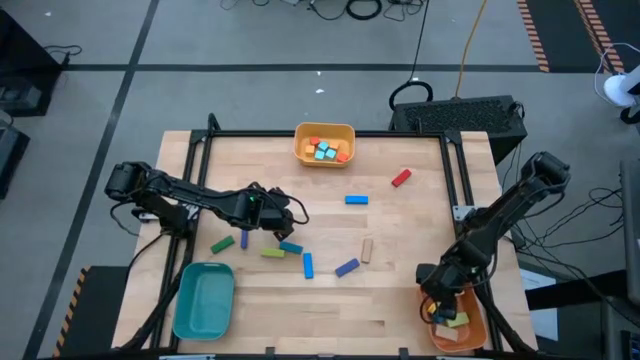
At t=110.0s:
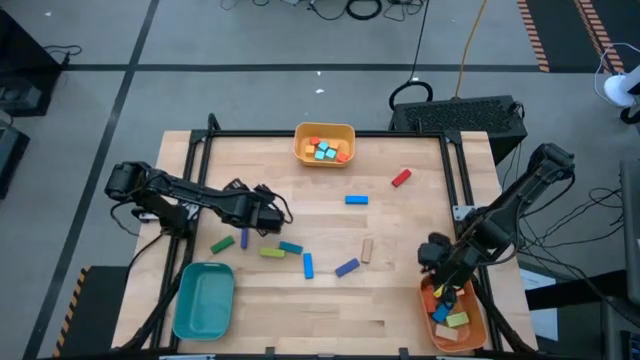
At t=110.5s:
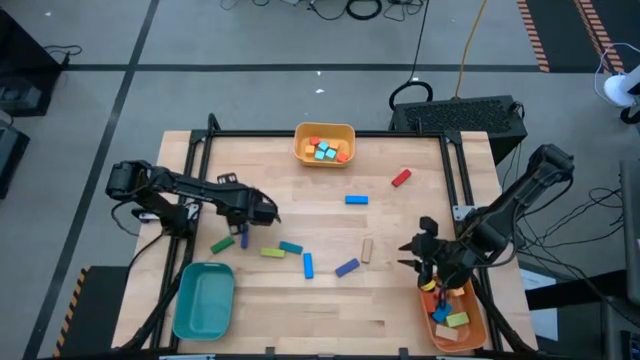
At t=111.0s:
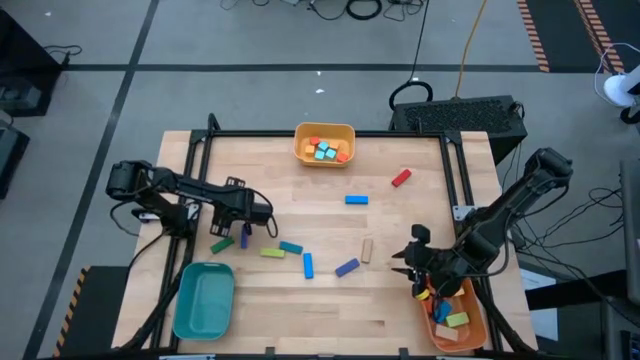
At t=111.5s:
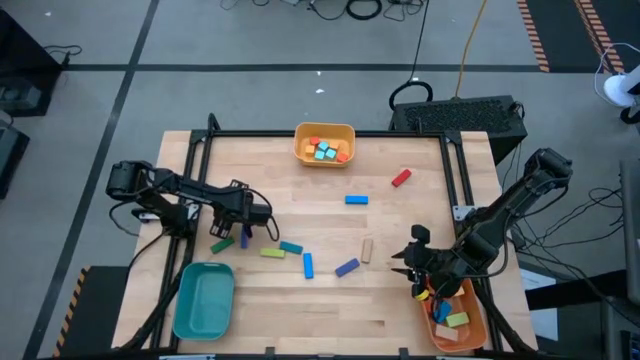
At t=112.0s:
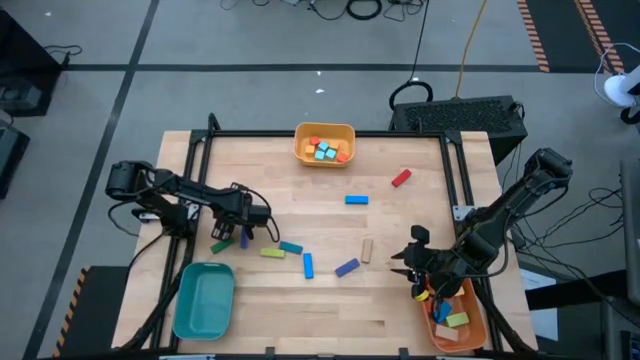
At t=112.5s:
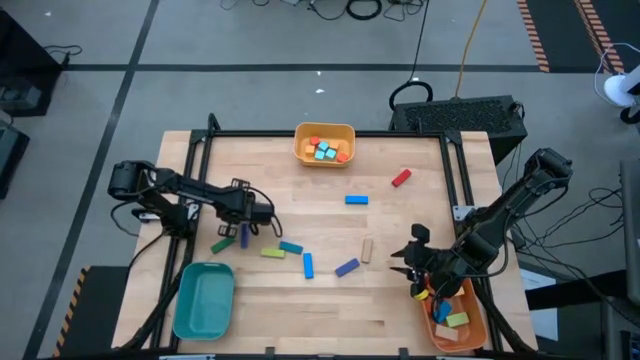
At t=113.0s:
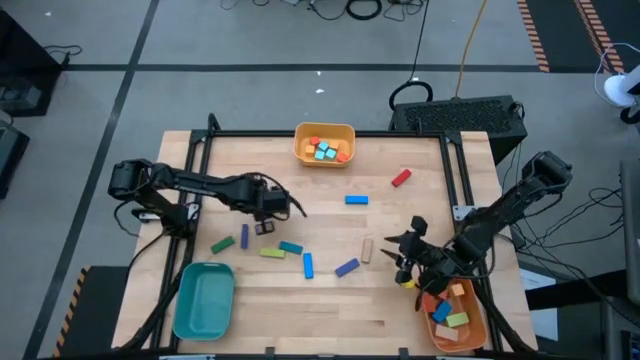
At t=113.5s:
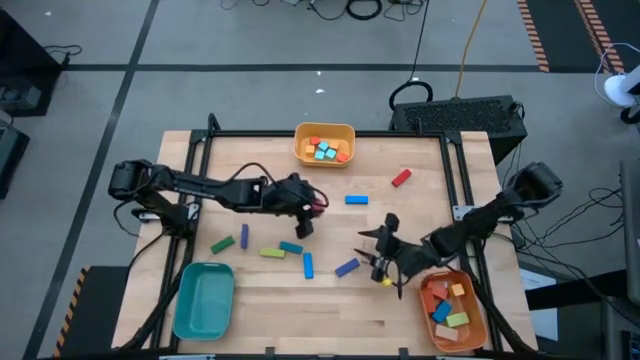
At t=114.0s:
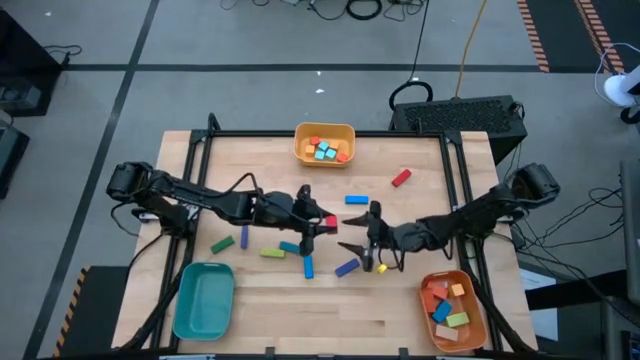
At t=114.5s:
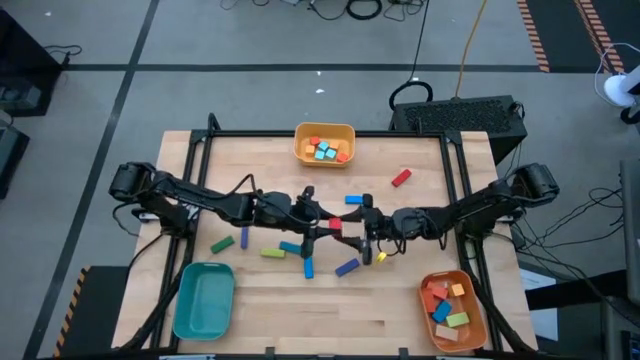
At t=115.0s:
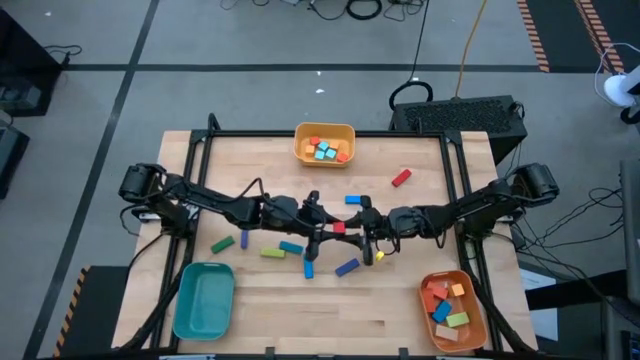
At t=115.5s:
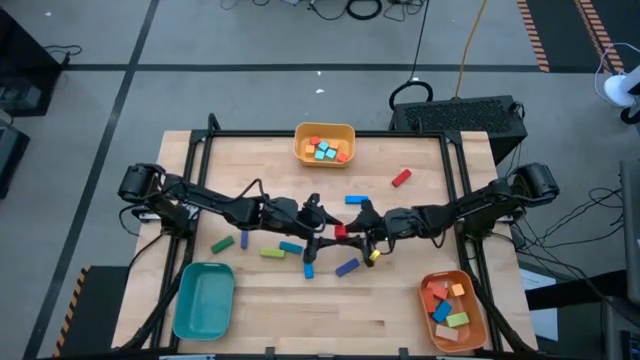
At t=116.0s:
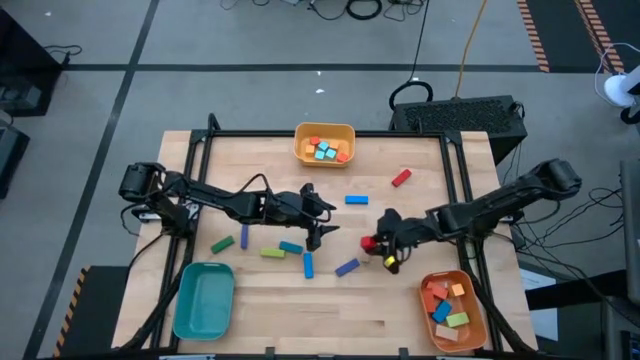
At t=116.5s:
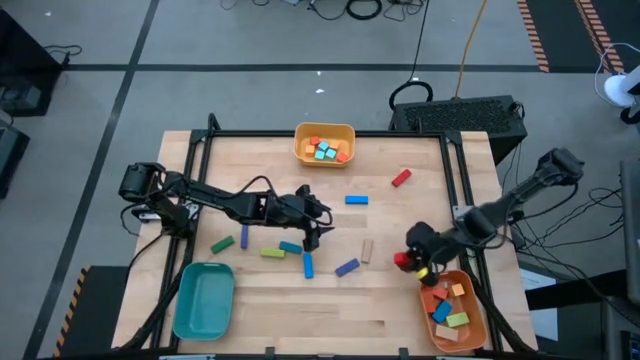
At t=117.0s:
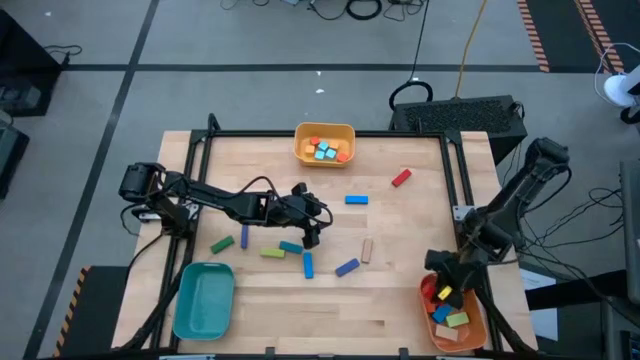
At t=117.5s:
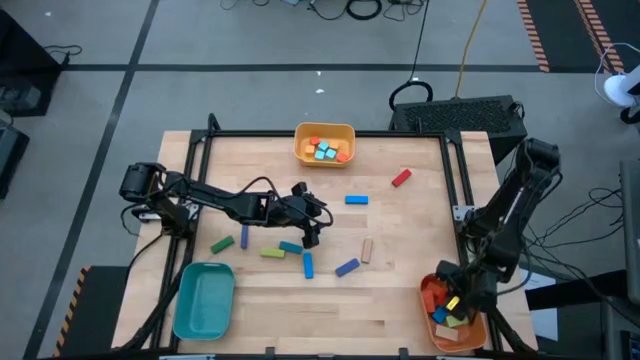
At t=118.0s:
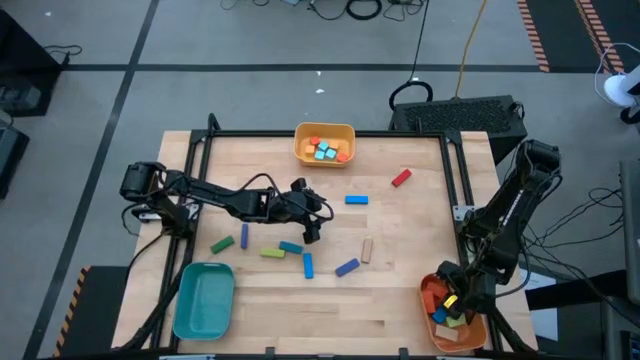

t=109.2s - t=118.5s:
Task: Sort blocks by size
Put the big red rectangle block into the orange bin

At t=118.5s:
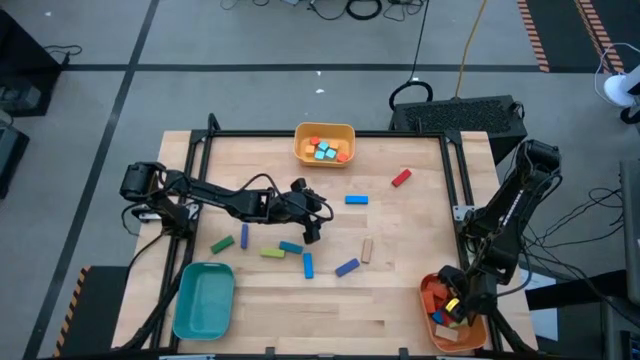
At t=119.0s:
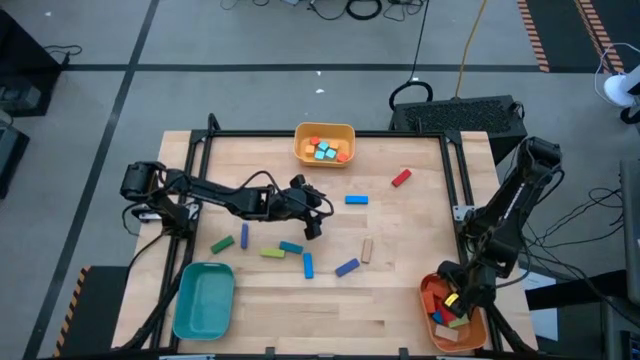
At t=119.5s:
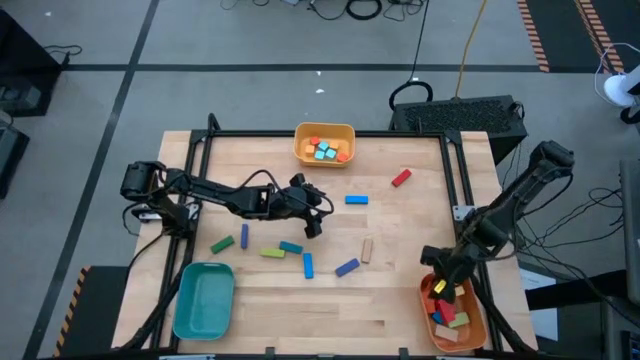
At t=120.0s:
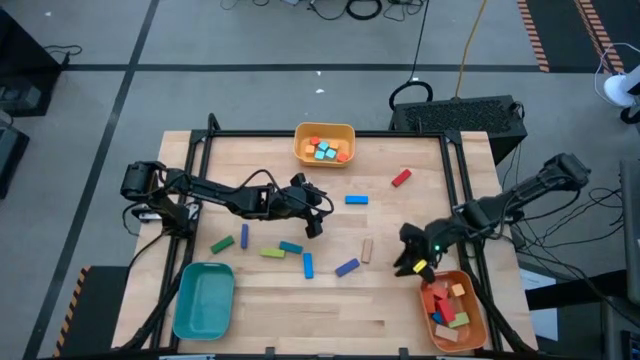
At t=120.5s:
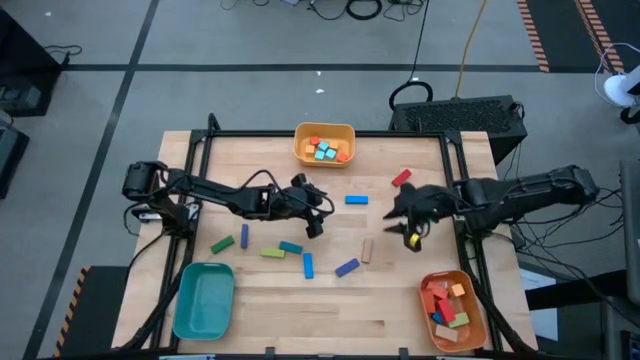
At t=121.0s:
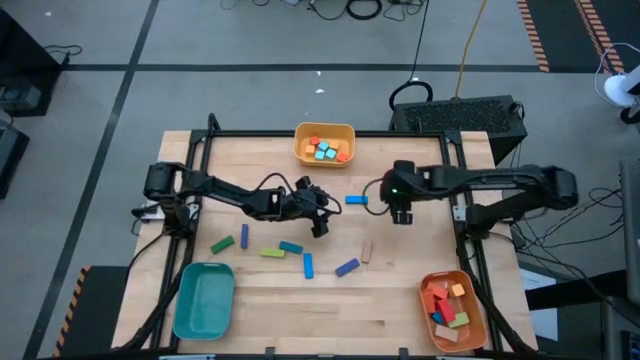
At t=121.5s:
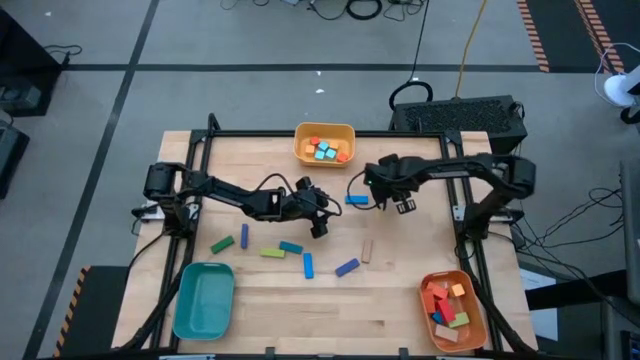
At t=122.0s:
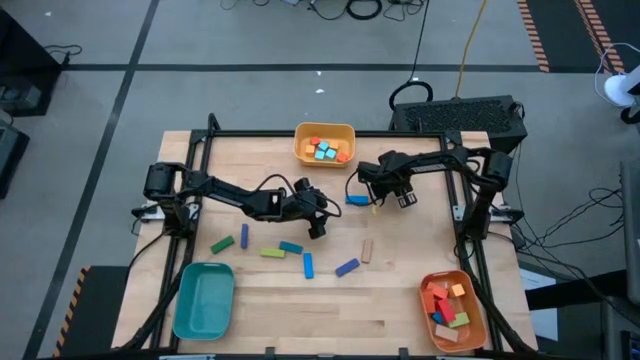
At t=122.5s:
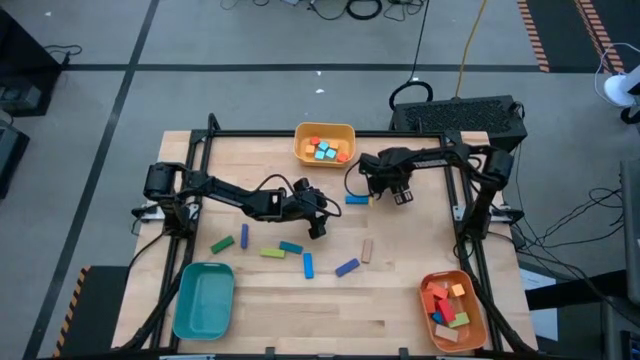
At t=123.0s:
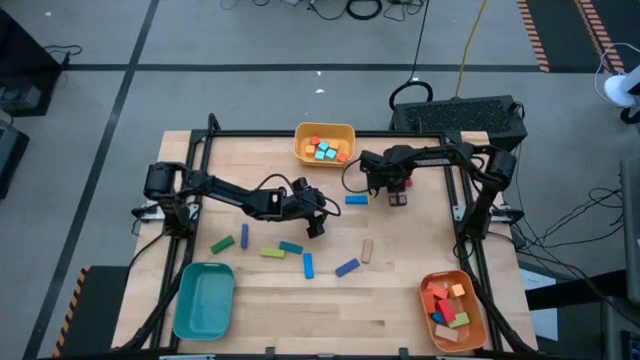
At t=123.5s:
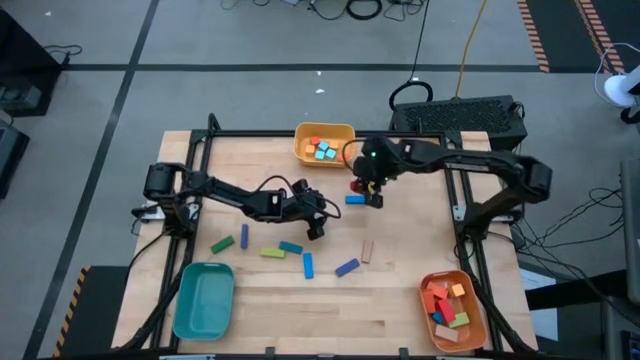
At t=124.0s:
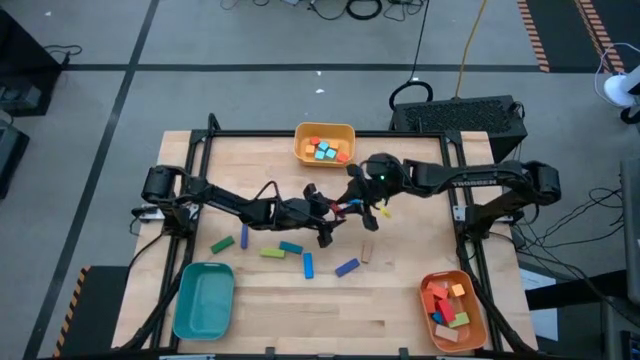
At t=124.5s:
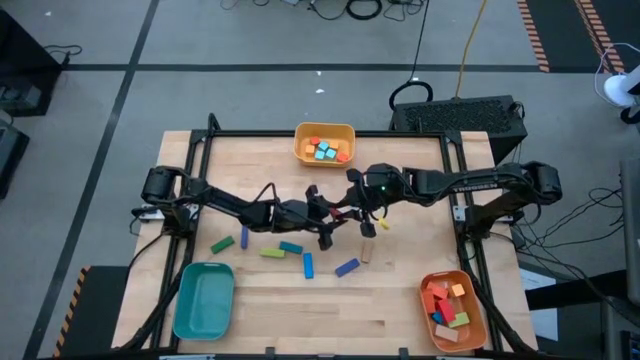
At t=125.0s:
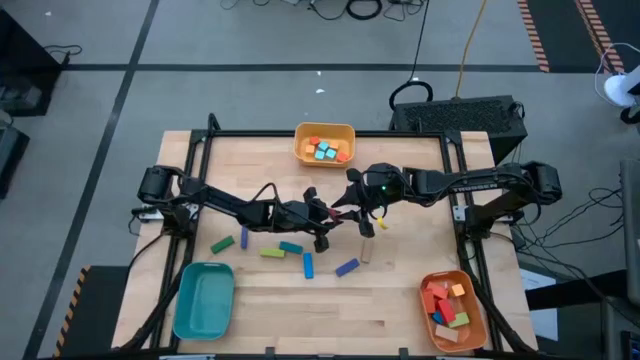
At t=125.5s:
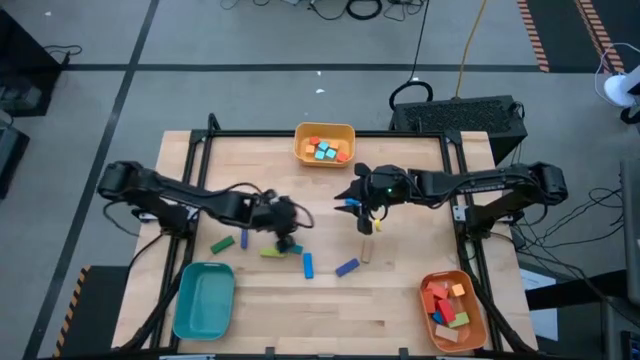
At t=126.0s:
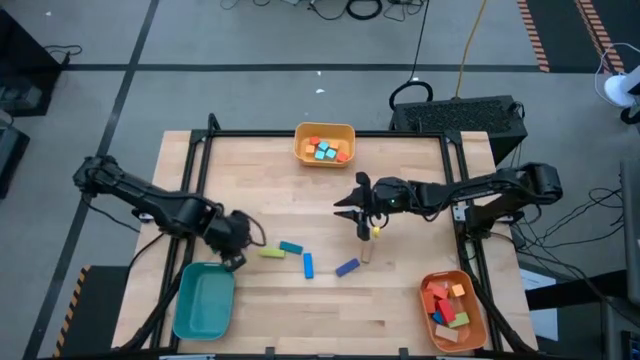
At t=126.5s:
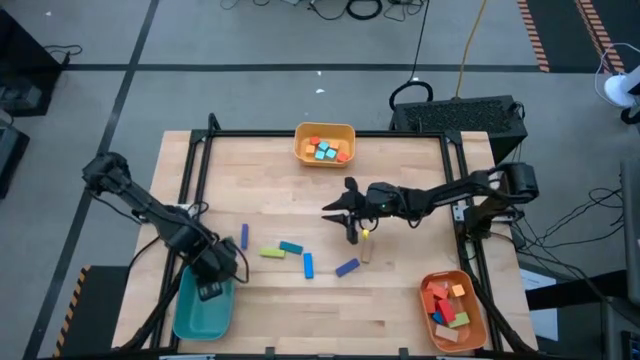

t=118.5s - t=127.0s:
Put the small red rectangle block into the green bin

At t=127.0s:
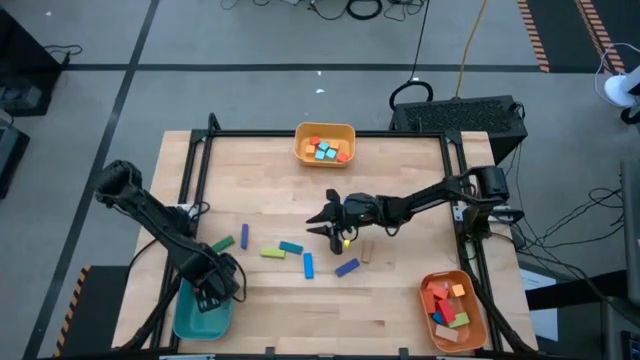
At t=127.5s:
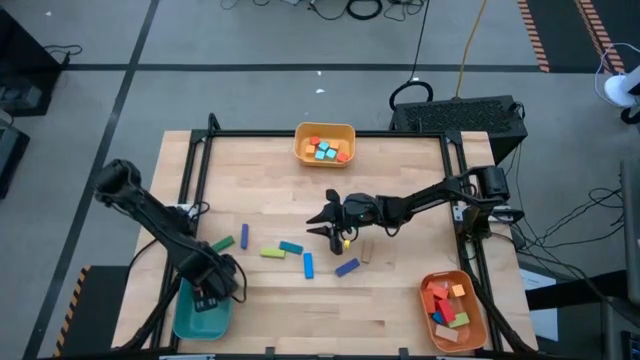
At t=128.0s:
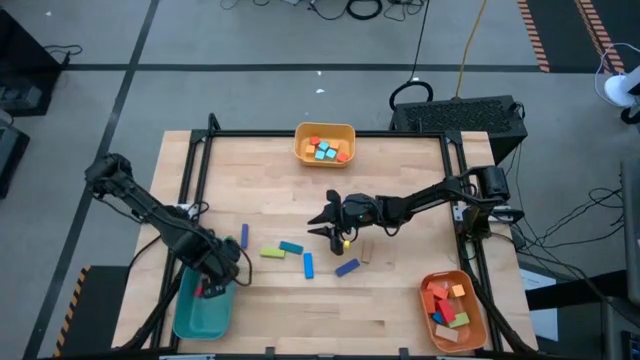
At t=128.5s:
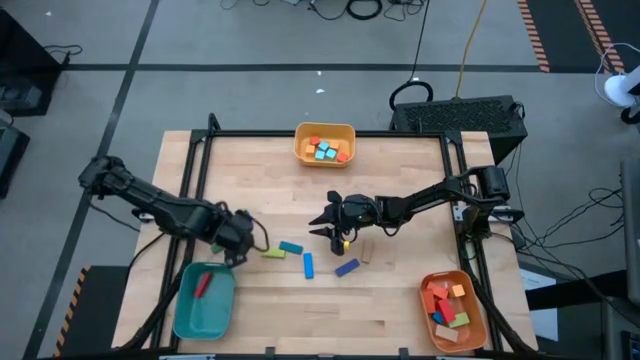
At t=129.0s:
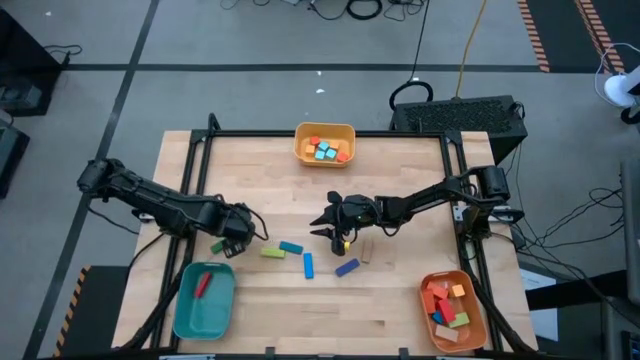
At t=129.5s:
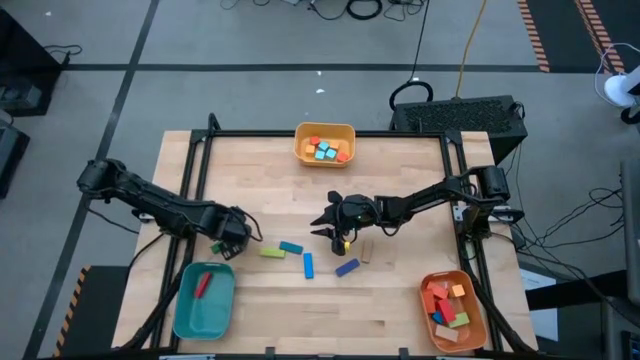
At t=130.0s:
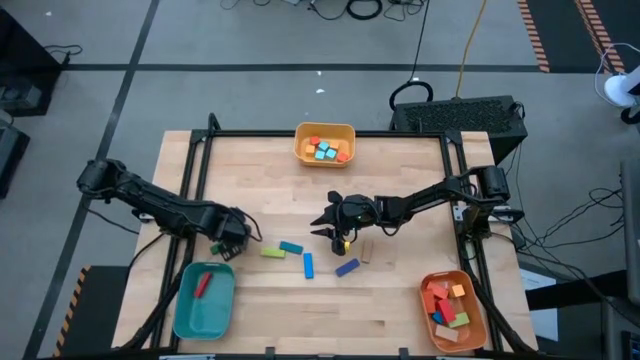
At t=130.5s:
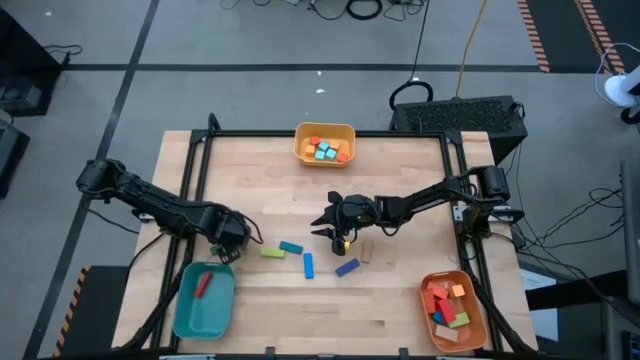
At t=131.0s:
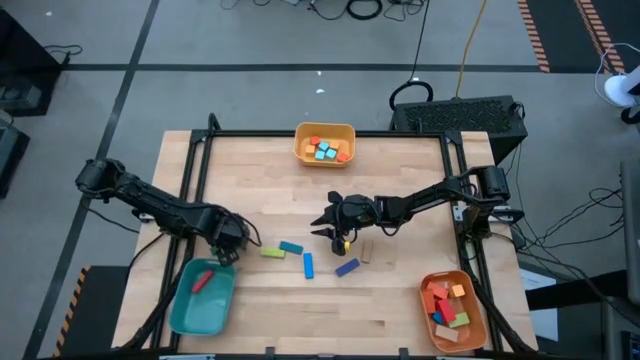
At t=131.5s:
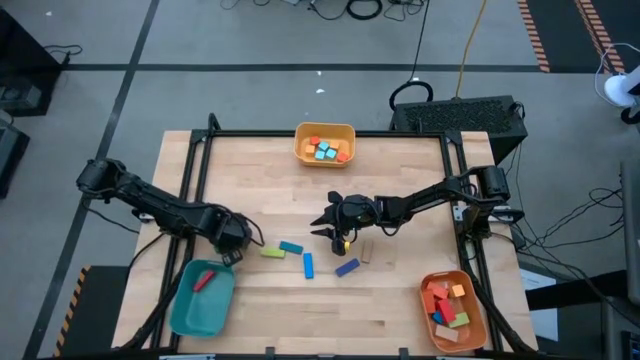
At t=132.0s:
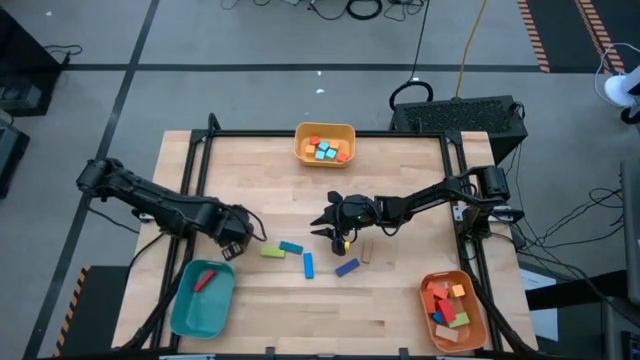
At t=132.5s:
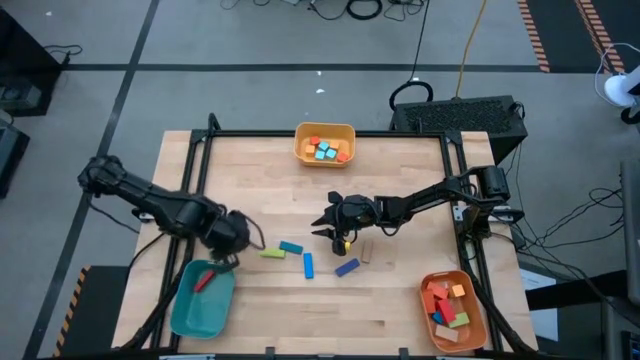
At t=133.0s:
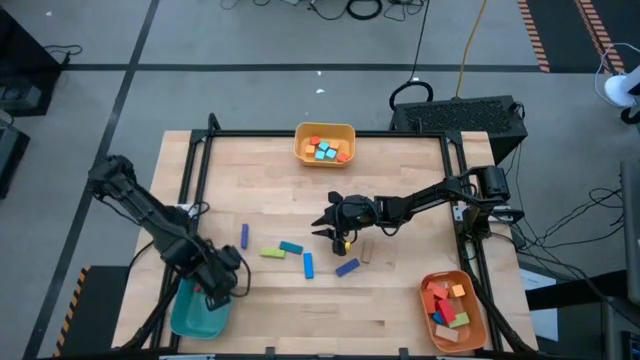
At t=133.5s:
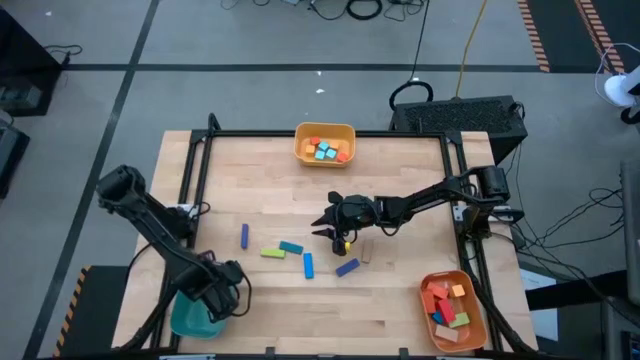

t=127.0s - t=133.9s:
Put the small dark green rectangle block into the green bin
